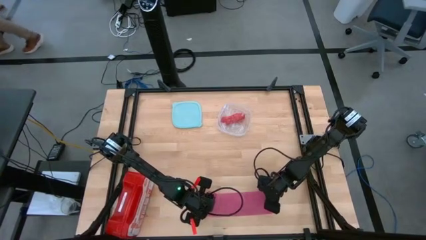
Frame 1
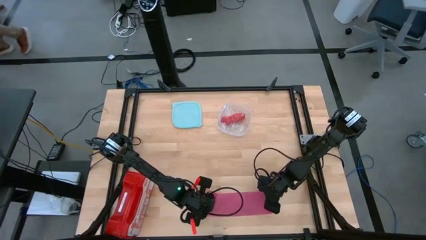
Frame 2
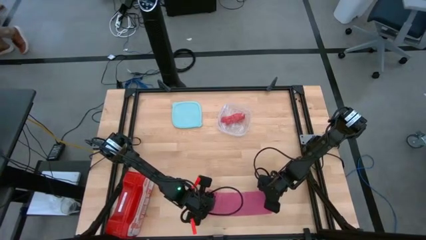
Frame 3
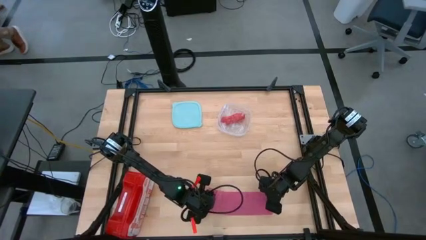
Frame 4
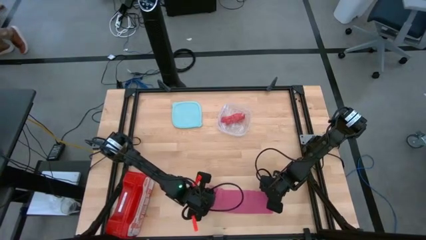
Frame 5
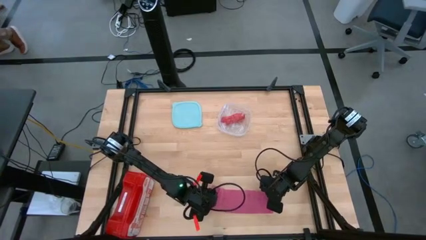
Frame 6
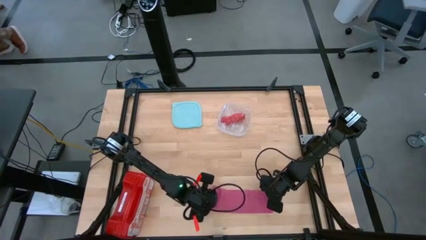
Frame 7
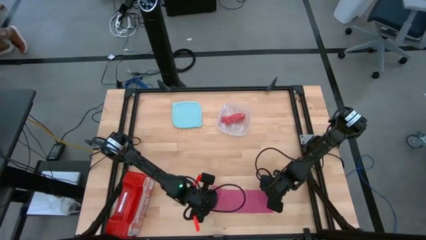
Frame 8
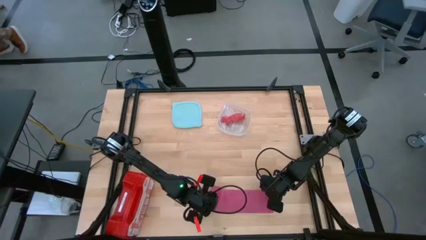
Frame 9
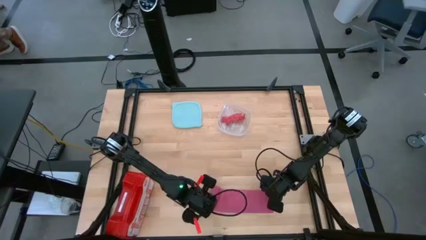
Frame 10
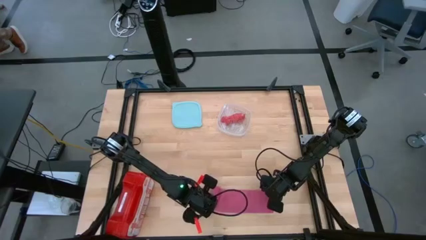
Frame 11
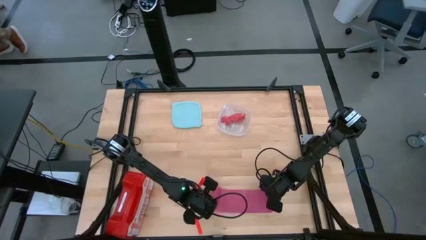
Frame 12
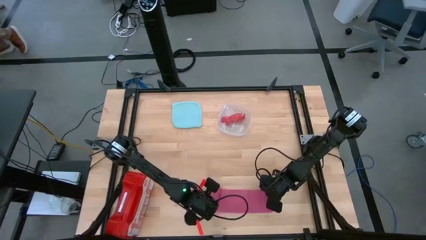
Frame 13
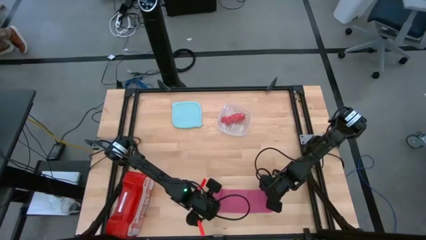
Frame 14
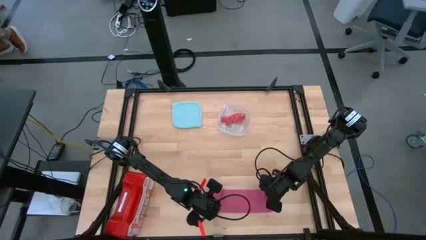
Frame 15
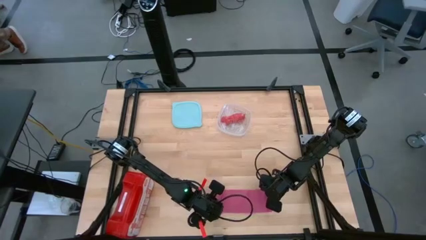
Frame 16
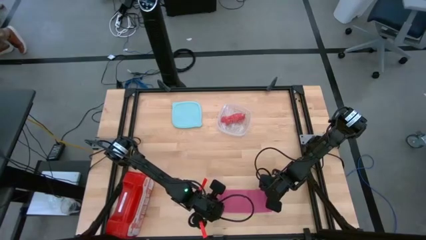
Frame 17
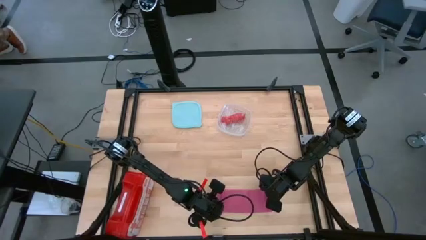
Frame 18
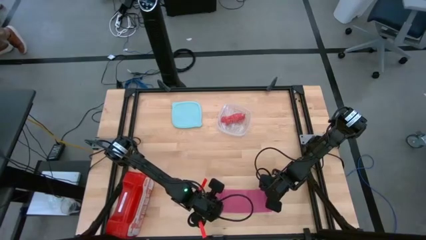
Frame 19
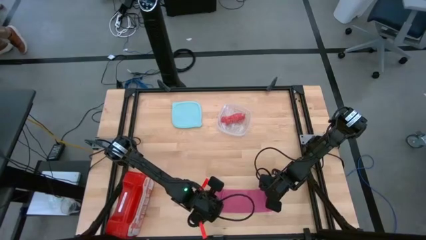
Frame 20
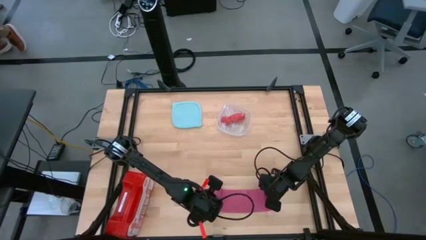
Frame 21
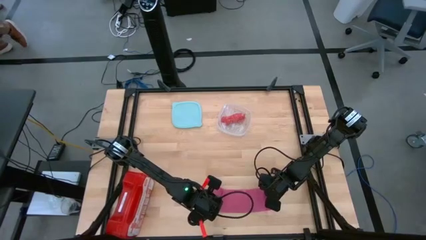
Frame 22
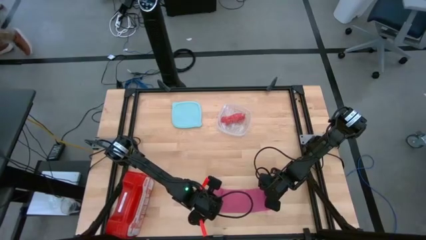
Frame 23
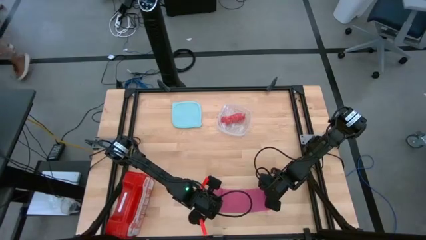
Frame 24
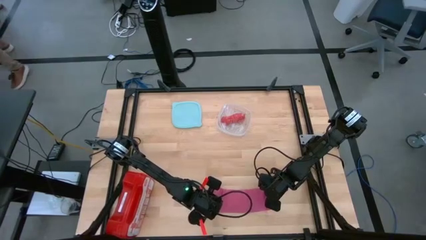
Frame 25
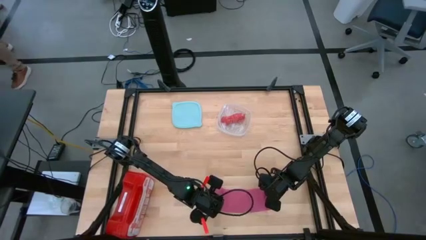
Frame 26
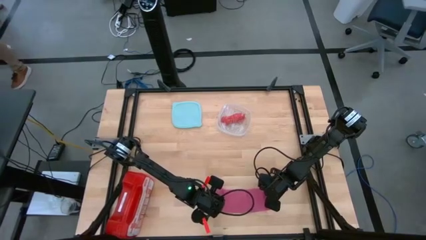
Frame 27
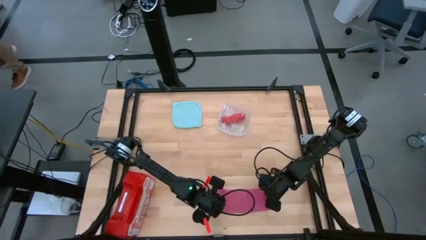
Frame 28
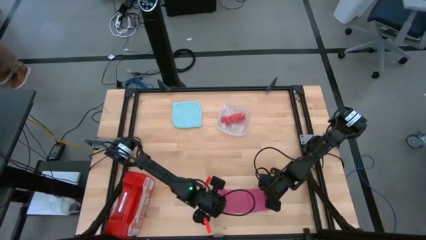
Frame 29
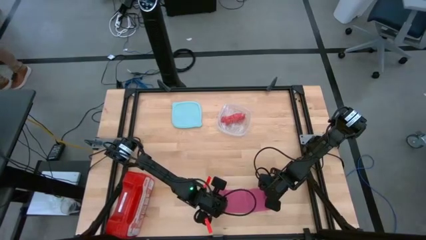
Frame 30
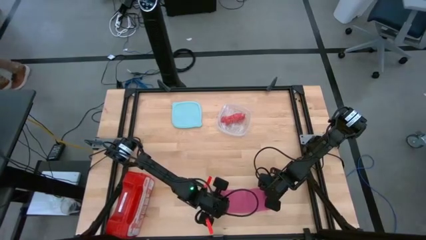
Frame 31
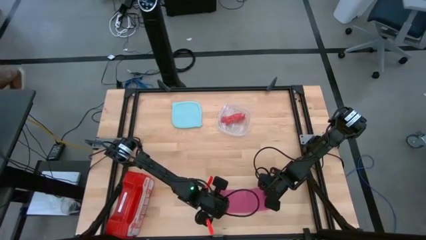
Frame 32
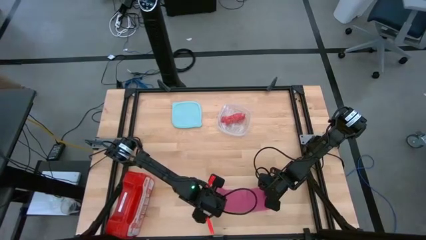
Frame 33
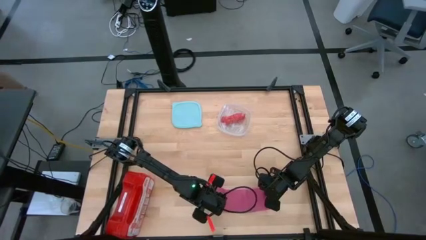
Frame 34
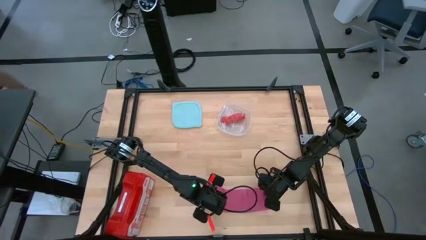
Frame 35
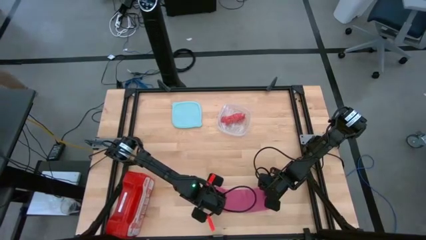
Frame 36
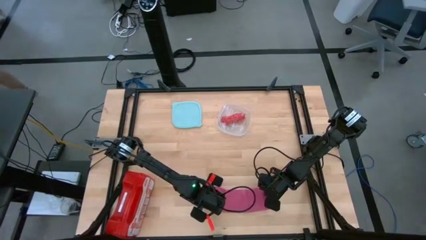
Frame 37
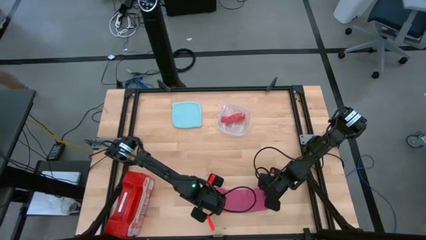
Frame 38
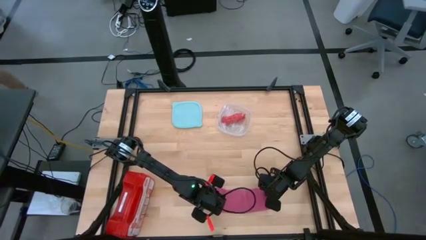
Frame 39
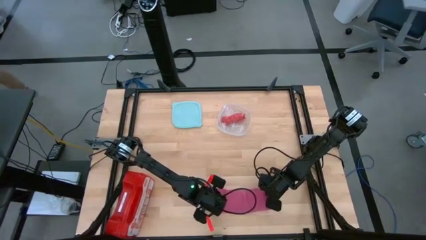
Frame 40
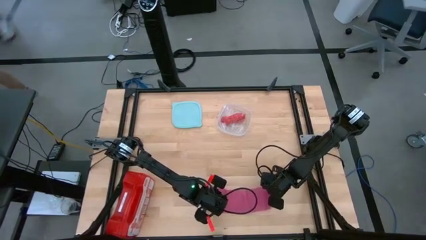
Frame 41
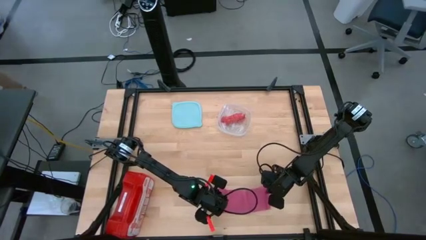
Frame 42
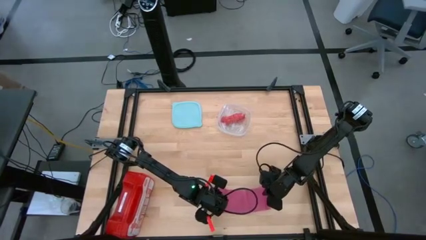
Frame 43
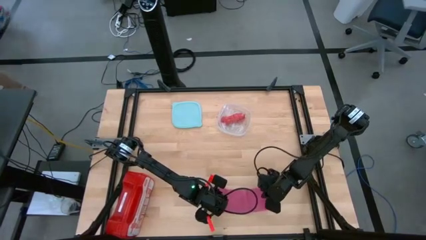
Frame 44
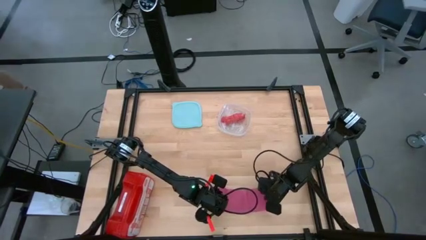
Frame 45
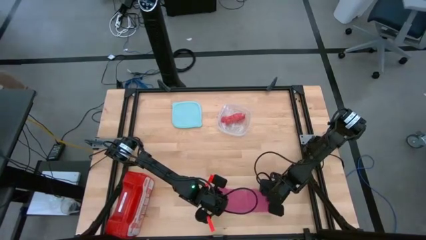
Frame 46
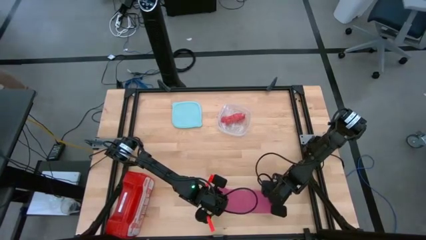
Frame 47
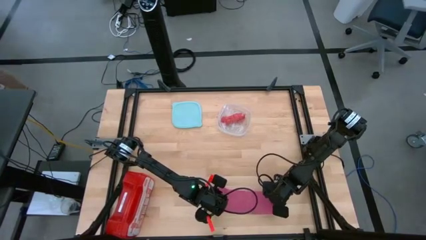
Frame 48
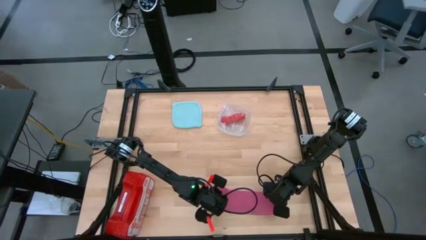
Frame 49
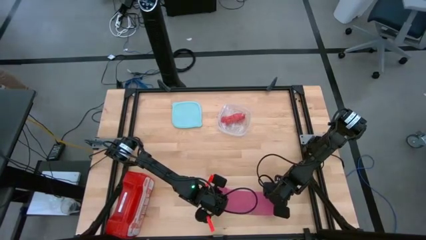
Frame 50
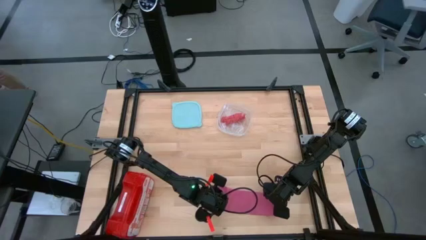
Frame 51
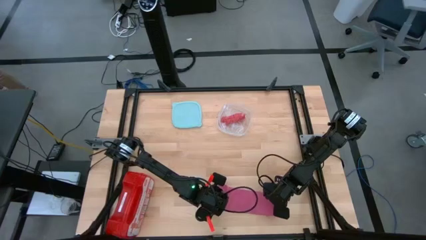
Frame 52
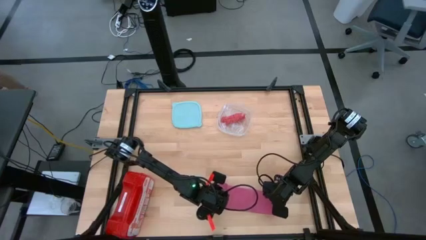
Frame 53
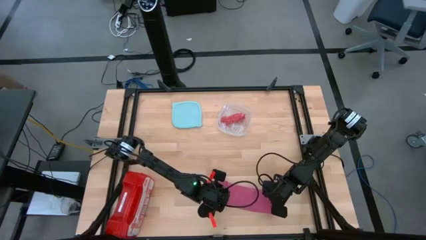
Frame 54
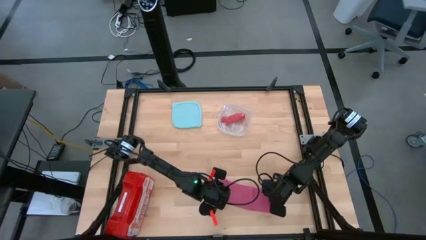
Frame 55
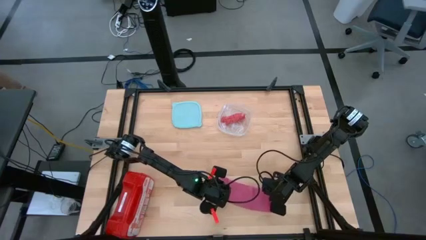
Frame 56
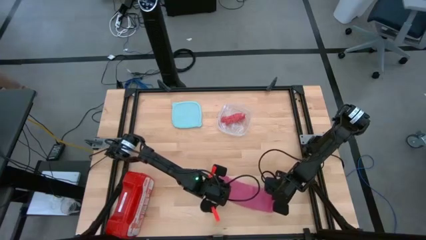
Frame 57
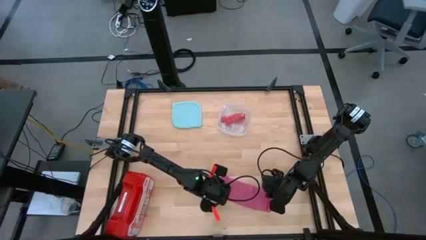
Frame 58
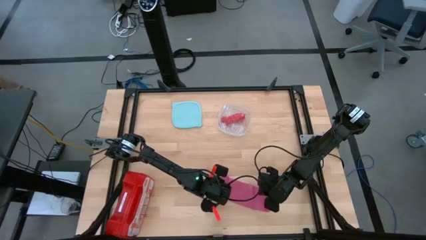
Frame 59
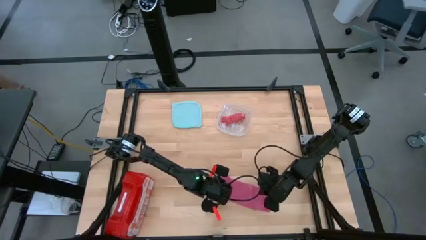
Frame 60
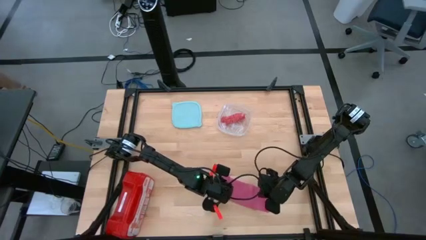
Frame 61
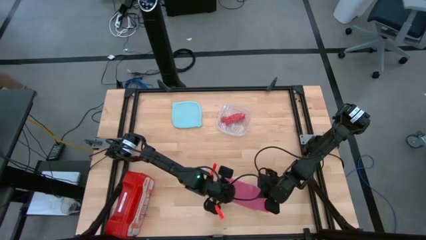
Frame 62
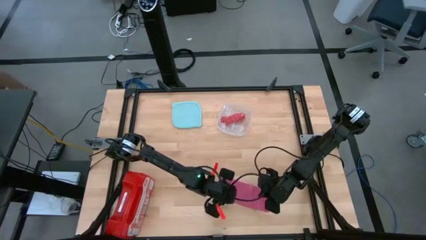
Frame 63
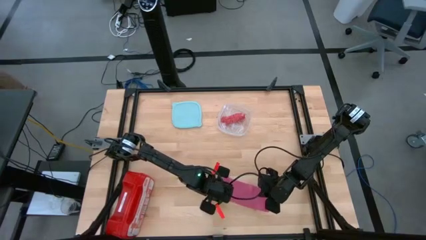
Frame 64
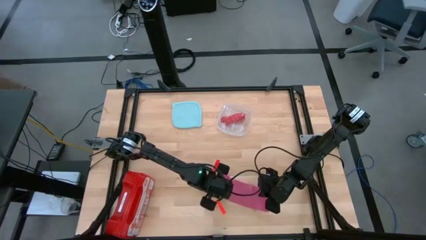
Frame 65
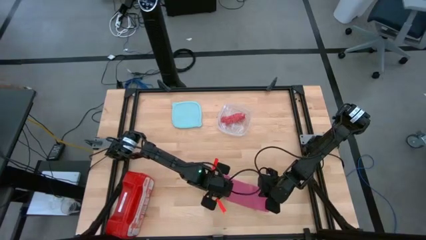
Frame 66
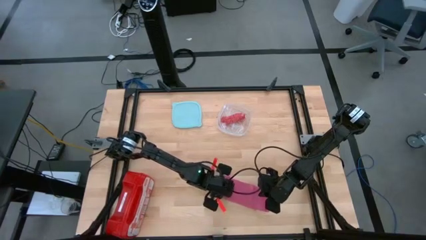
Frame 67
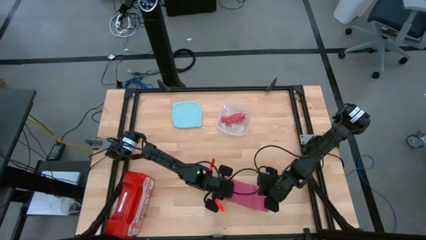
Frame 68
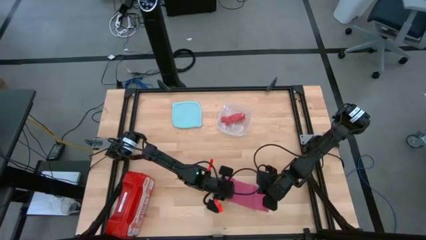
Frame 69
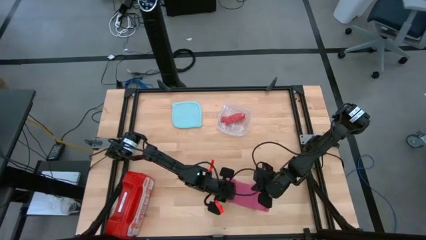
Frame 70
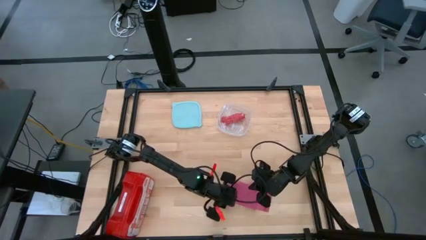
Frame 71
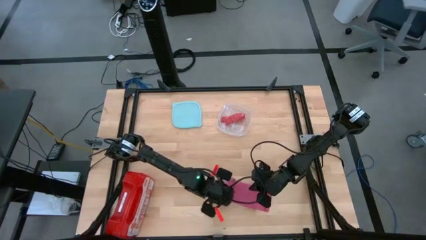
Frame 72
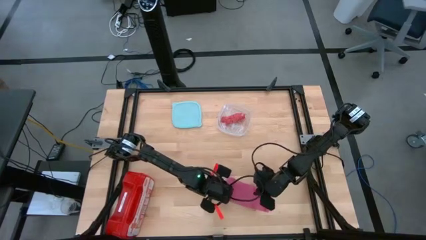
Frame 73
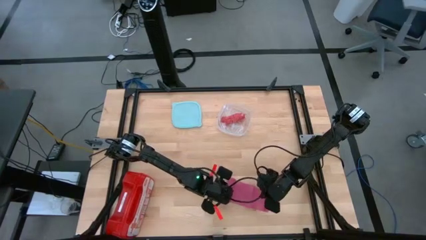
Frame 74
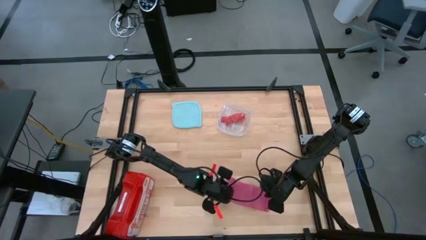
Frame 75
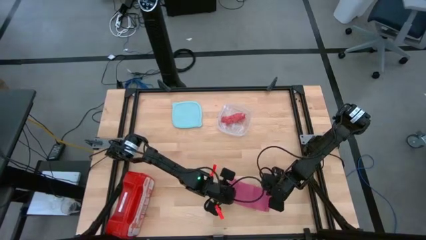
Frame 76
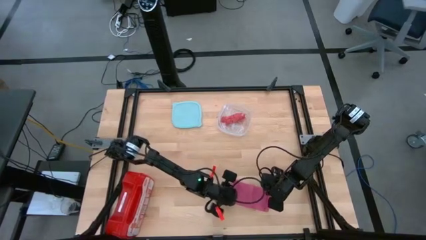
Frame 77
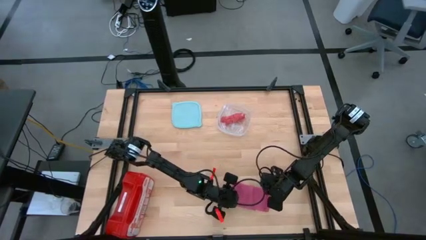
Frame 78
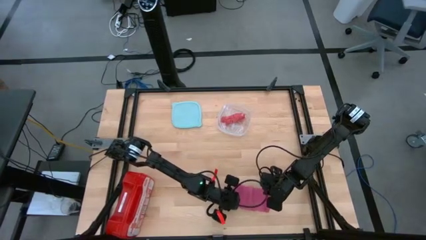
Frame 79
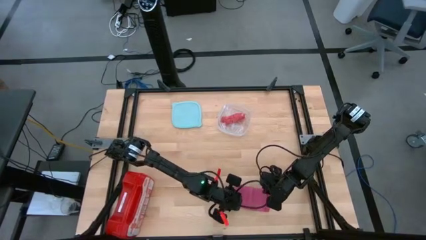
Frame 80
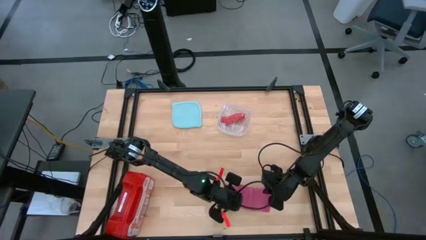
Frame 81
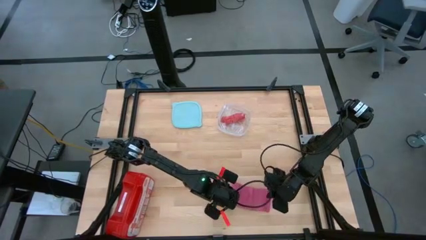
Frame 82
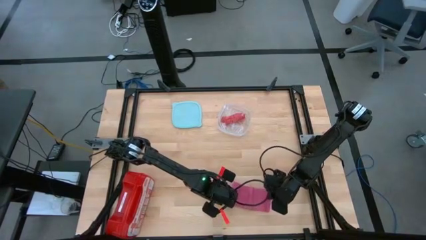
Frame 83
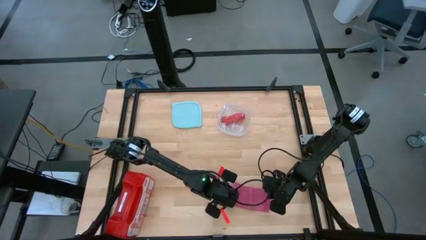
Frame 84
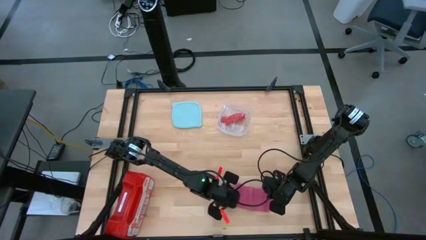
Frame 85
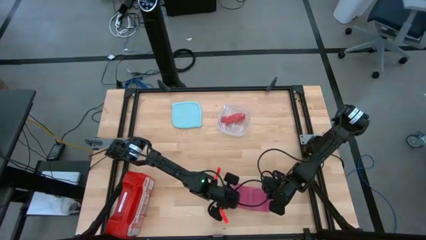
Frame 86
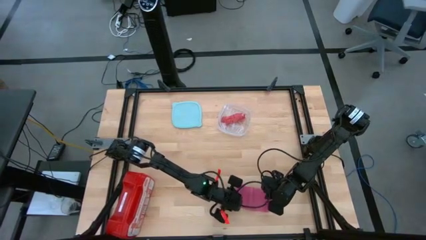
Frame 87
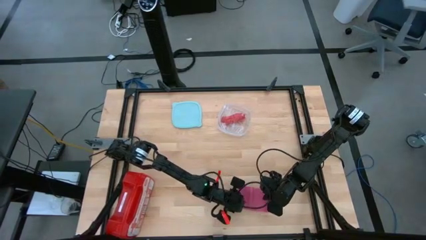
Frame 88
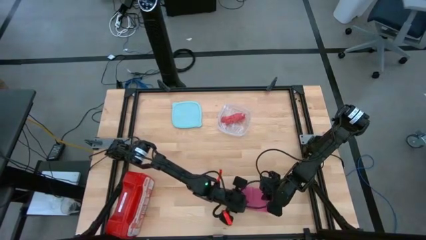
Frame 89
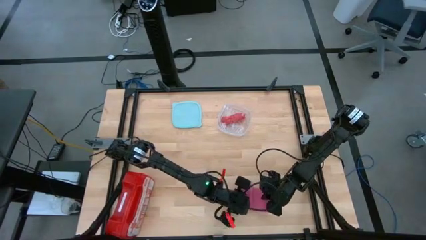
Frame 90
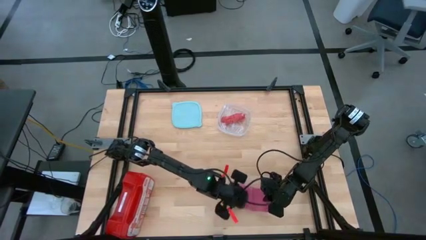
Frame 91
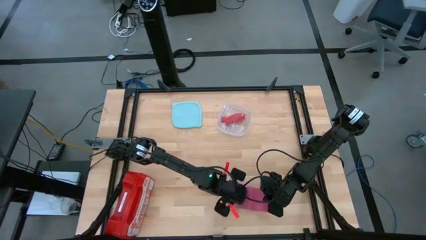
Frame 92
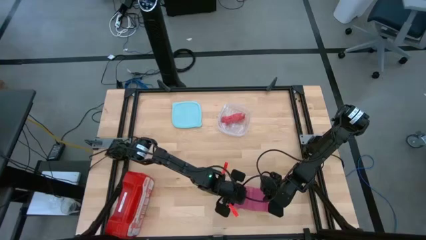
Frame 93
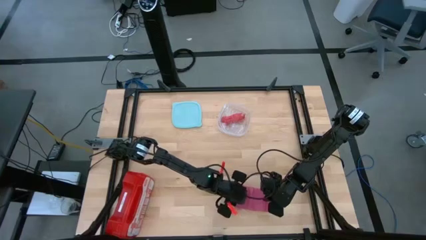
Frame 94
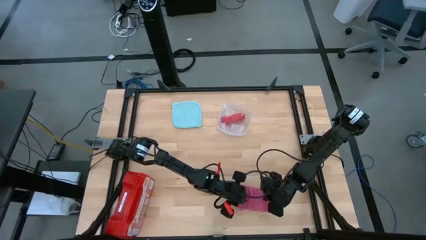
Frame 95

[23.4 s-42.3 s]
Task: Roll bandage
Roll the pink bandage
